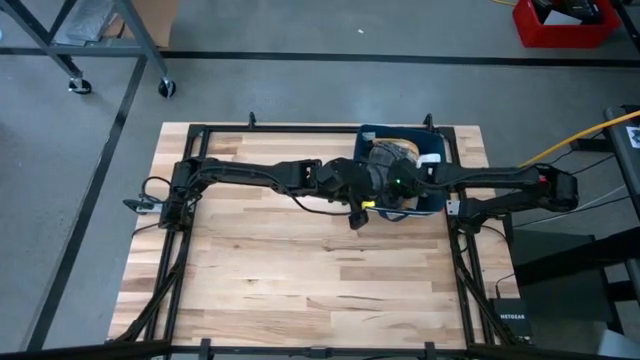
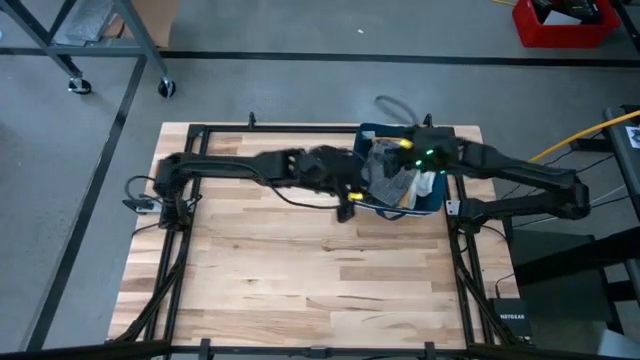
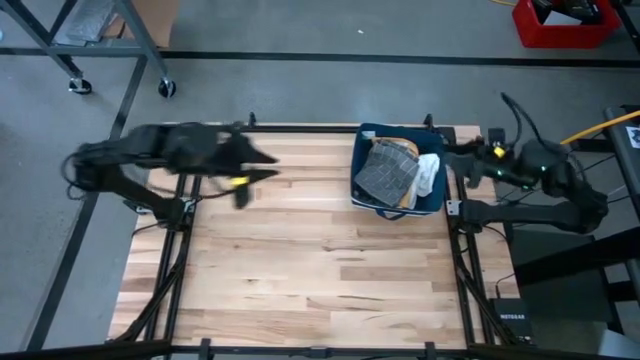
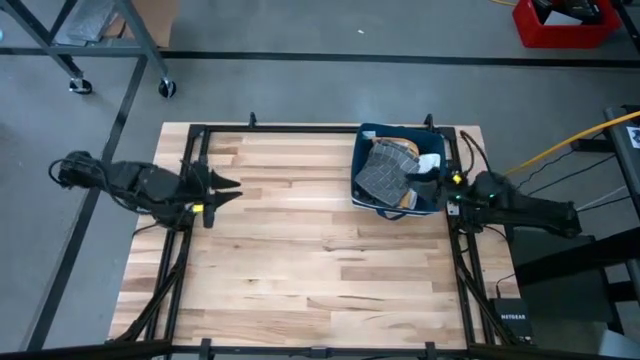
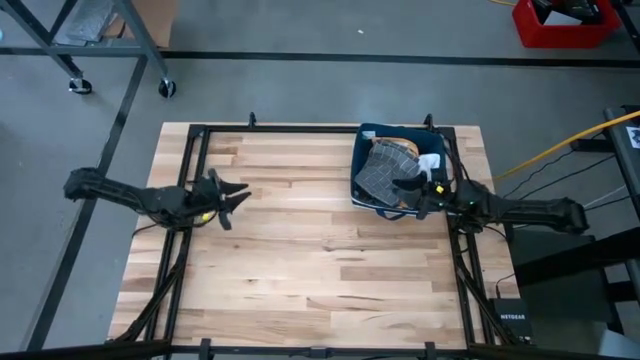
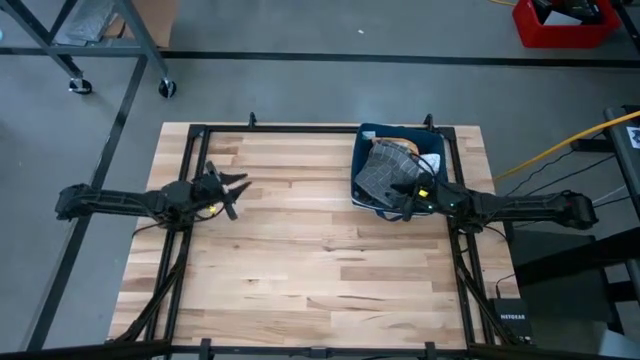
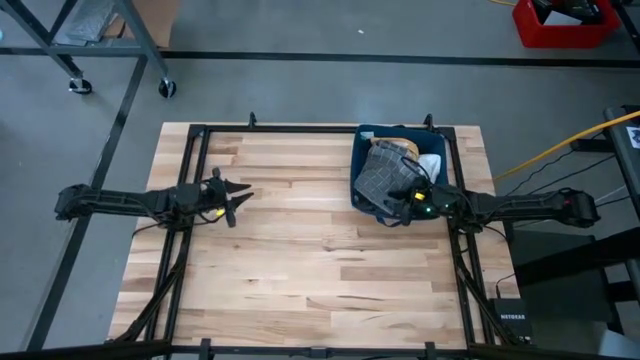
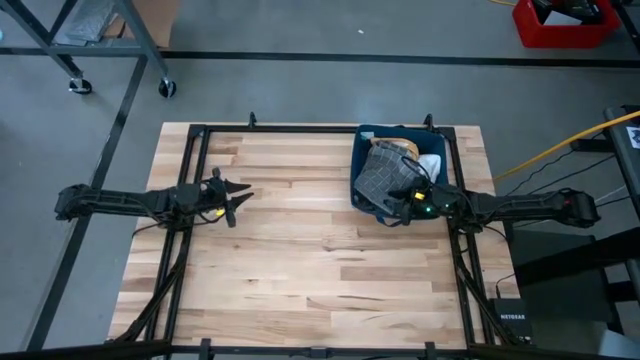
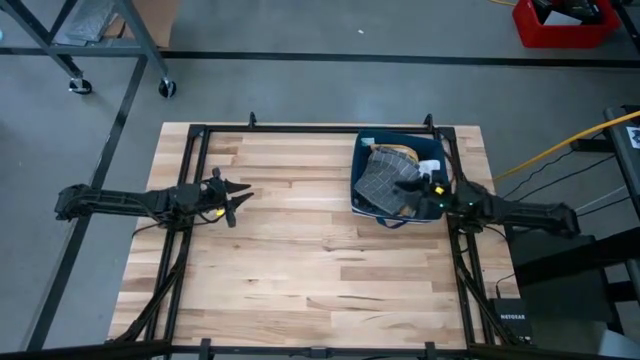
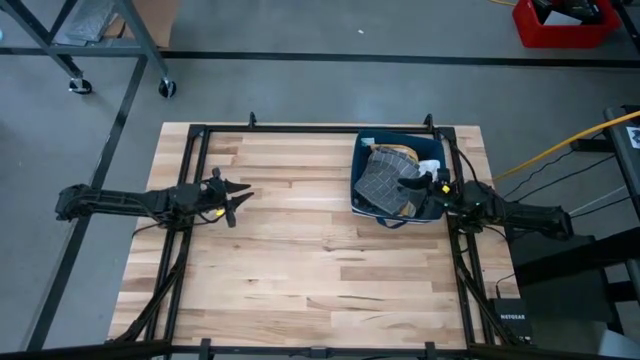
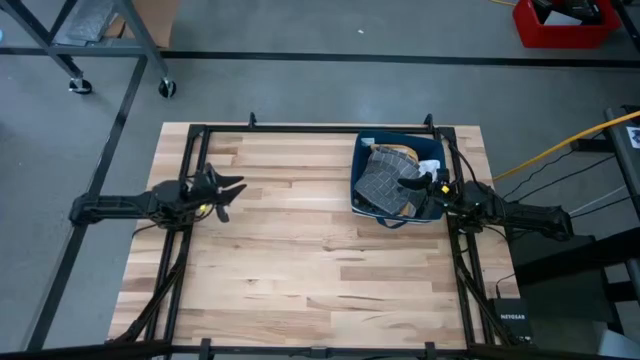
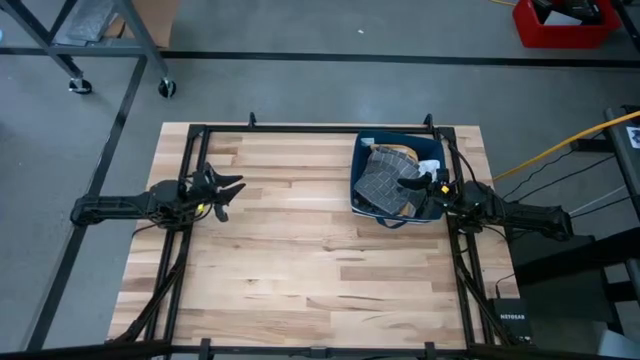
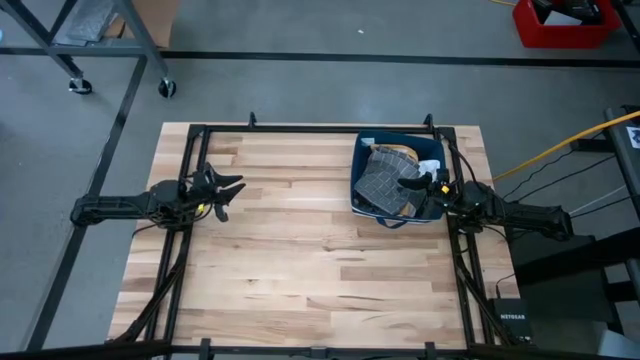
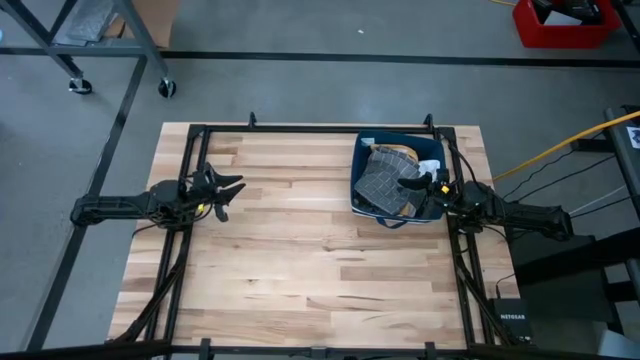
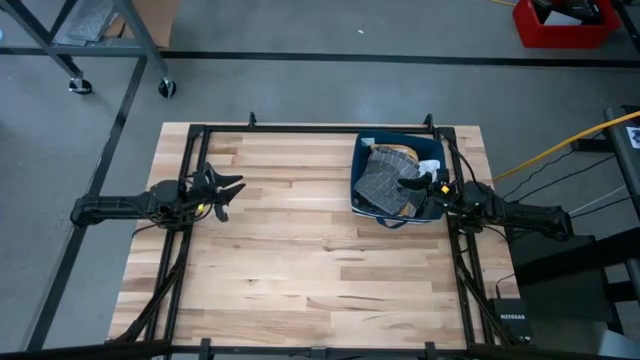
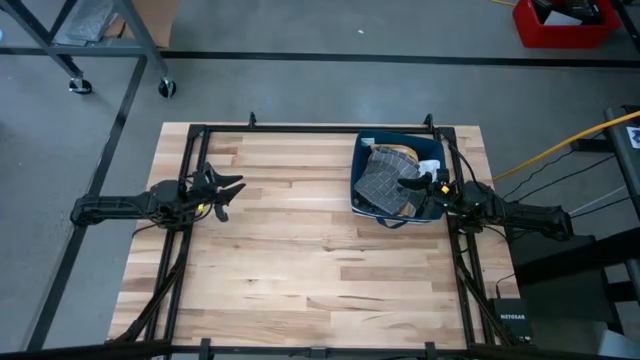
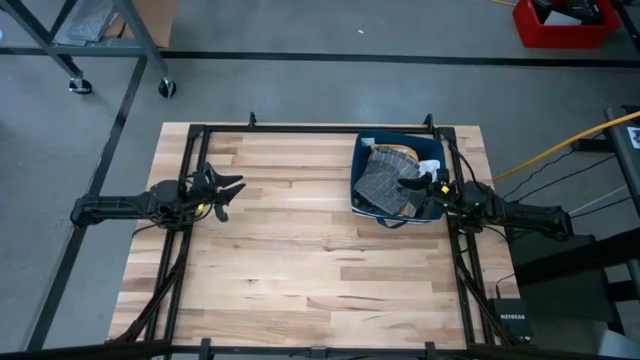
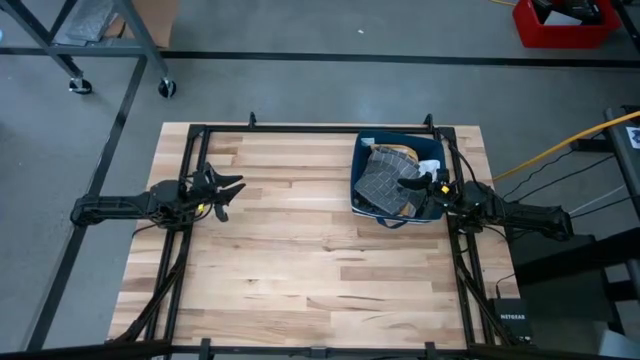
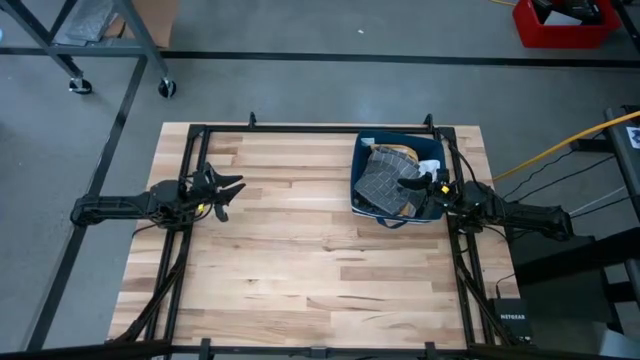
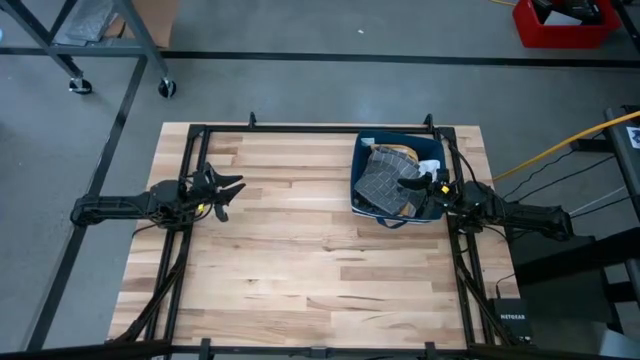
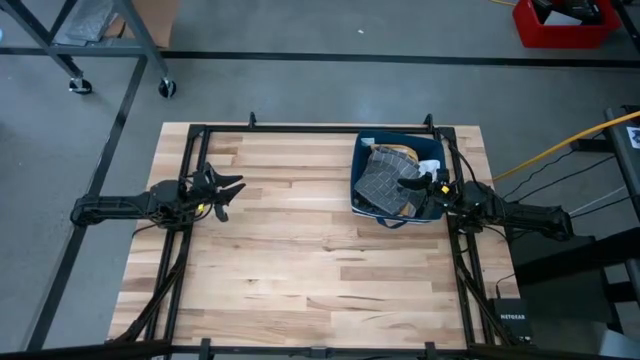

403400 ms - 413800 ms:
Task: Fold towel
Return to Home Position

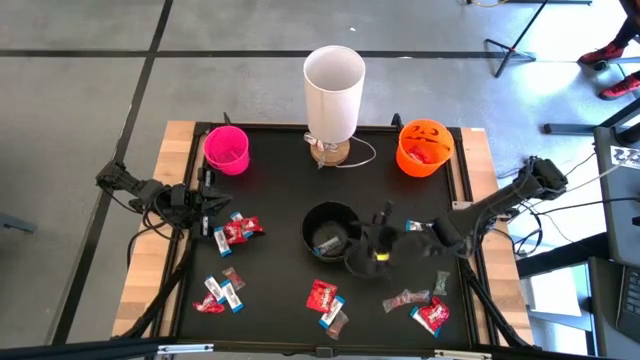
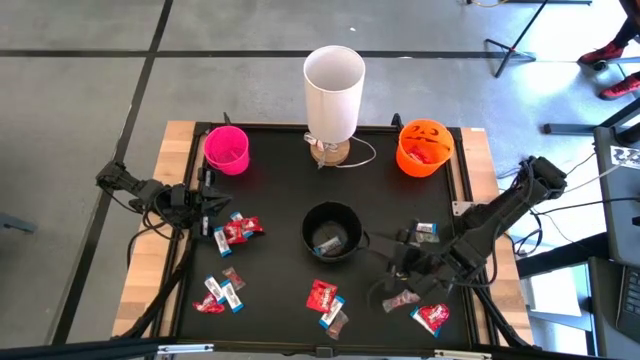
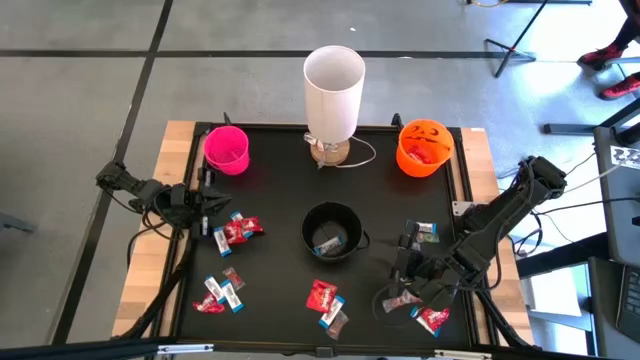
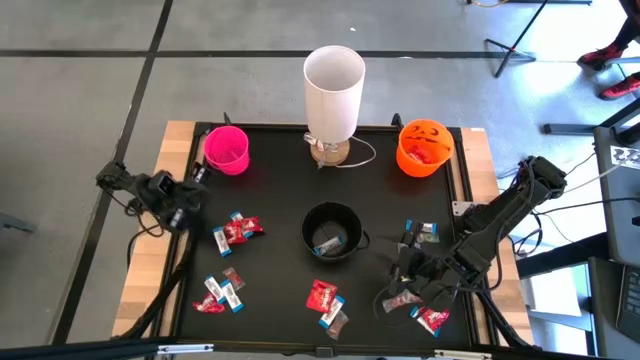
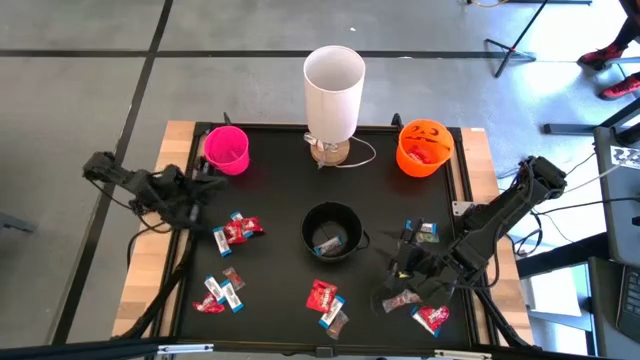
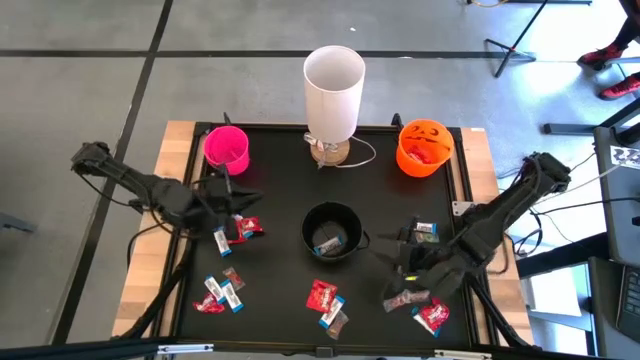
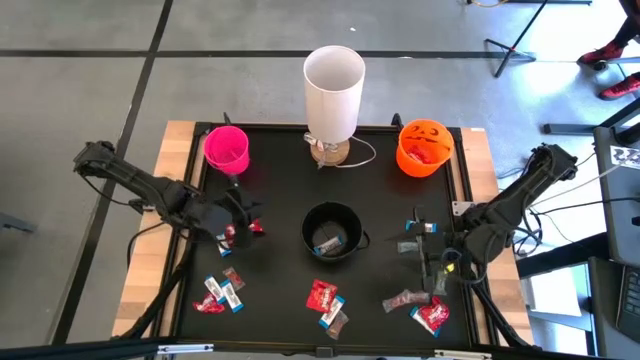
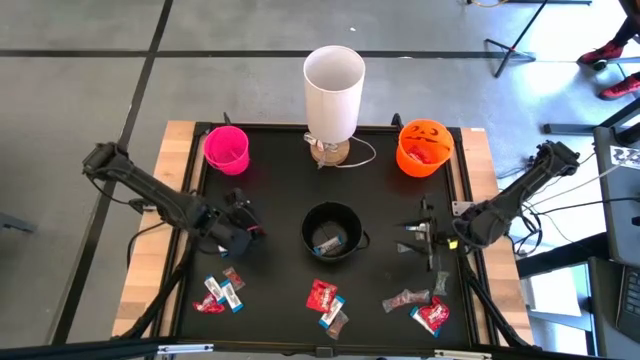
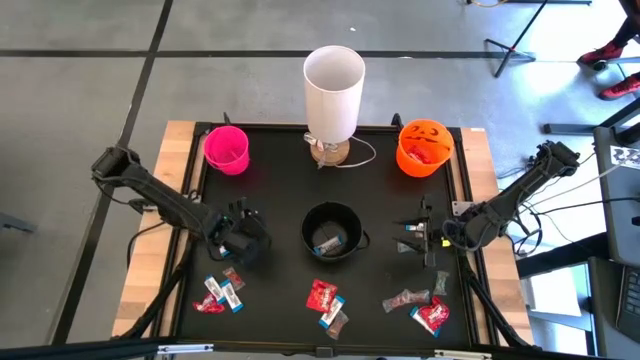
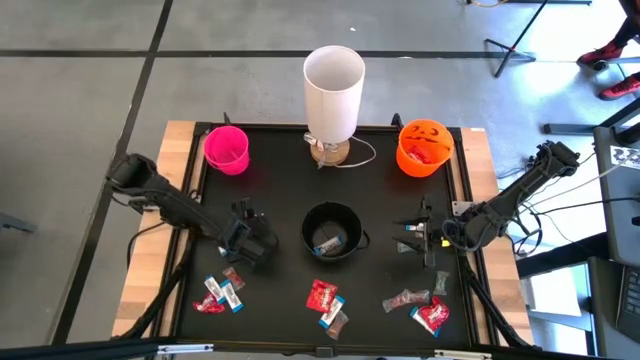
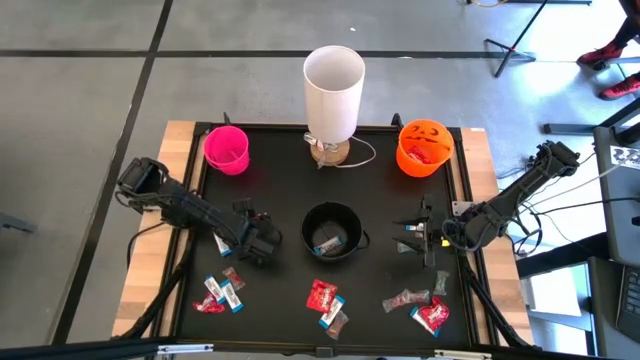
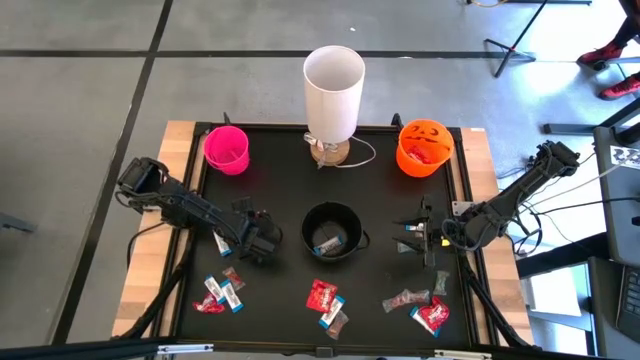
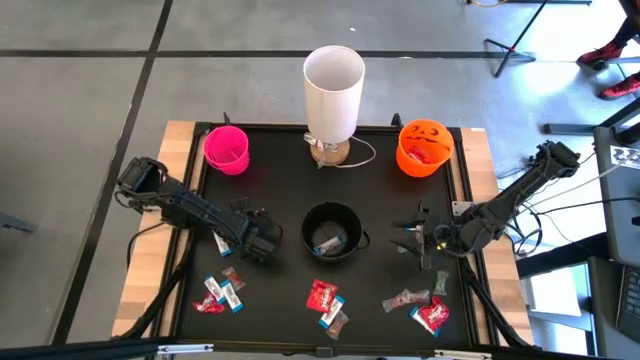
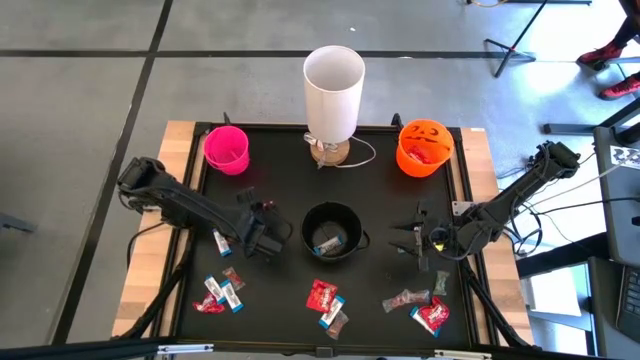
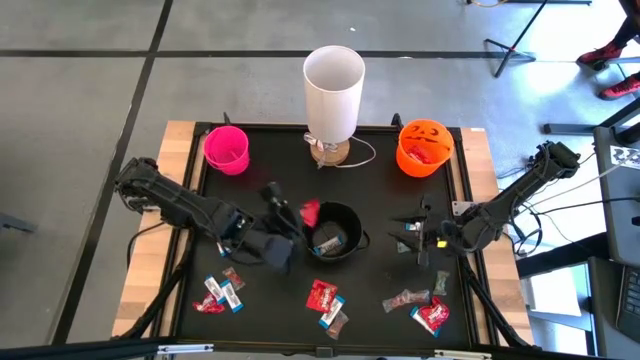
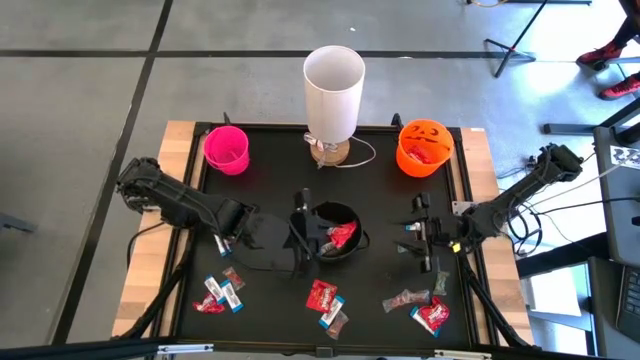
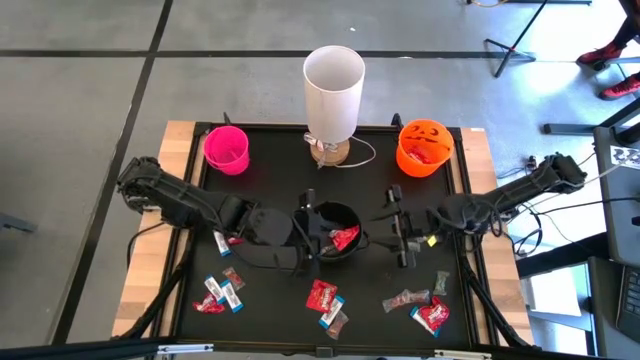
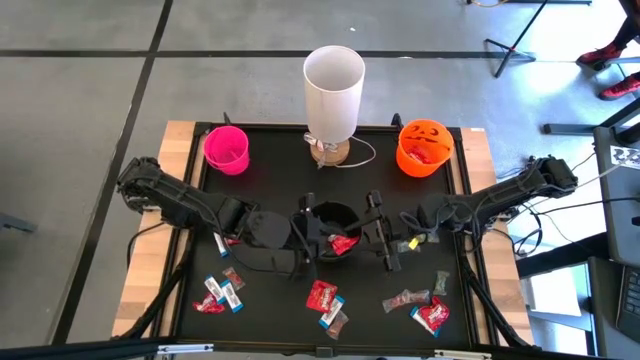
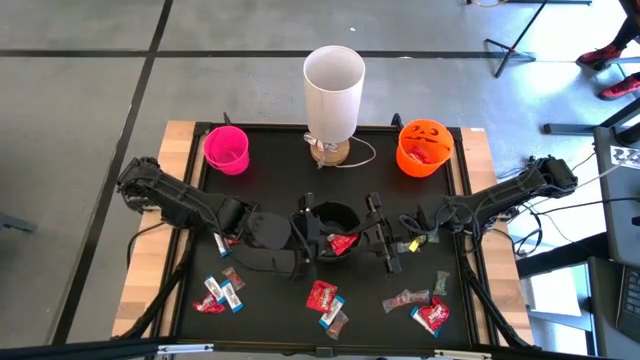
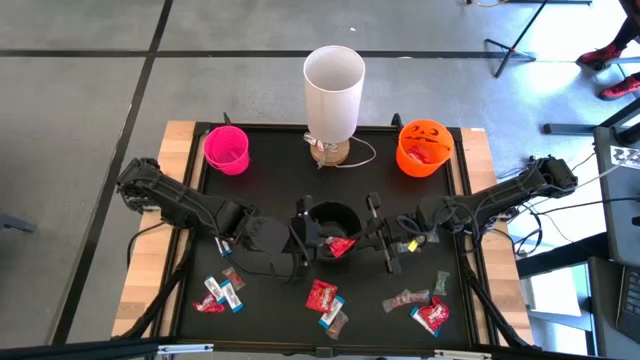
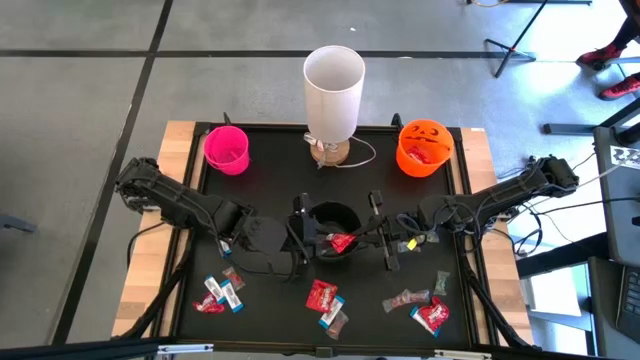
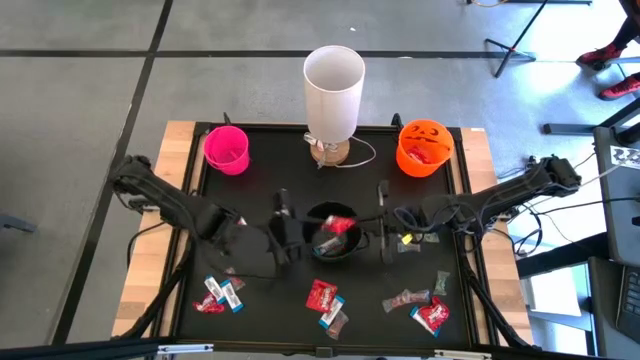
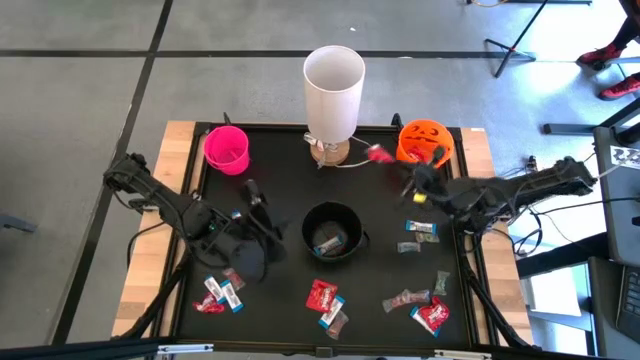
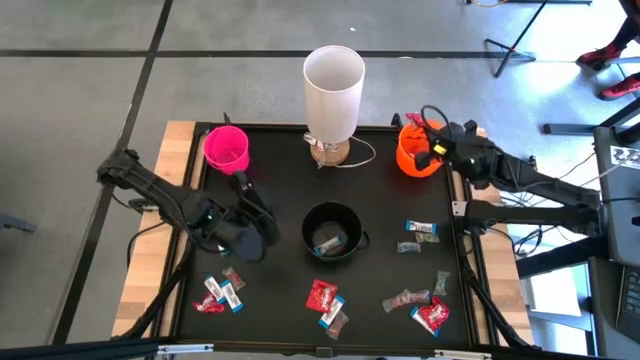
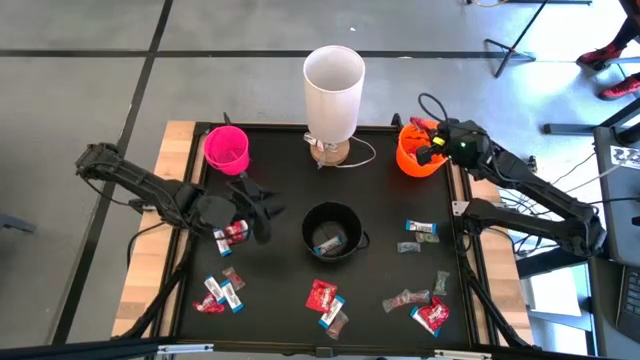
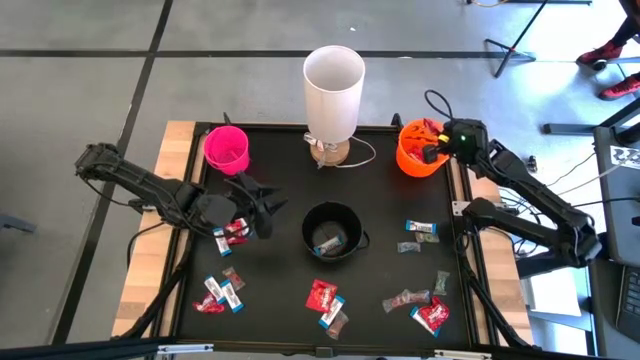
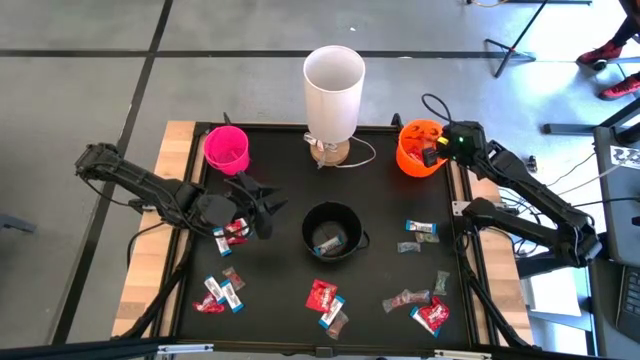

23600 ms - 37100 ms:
Task: Sort candy
Put the red candy pack into the orange bucket
